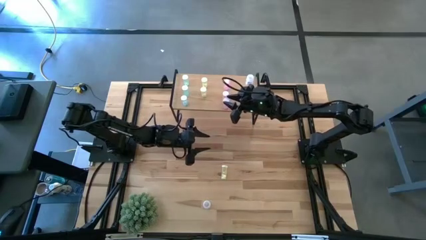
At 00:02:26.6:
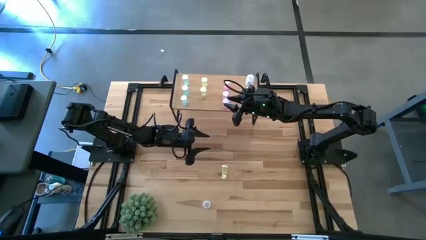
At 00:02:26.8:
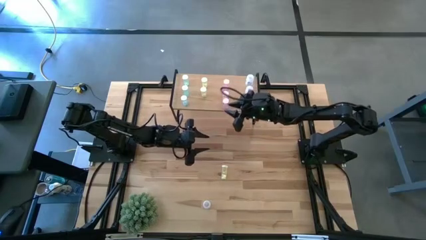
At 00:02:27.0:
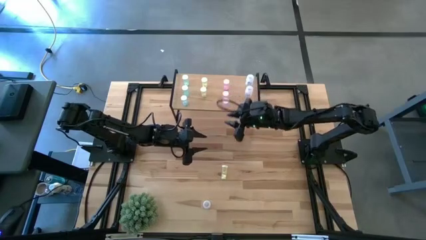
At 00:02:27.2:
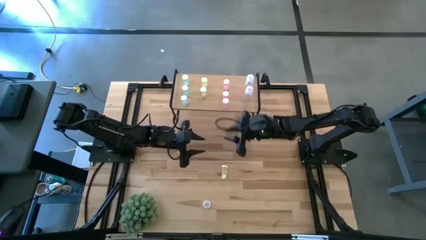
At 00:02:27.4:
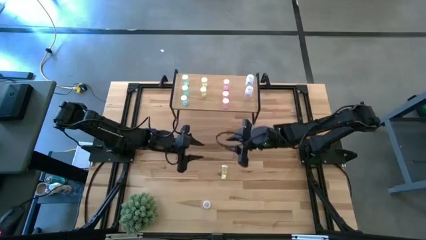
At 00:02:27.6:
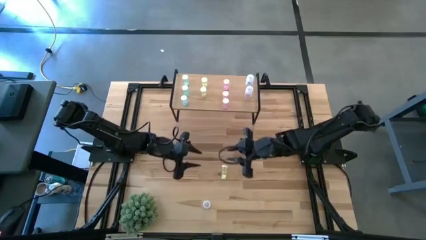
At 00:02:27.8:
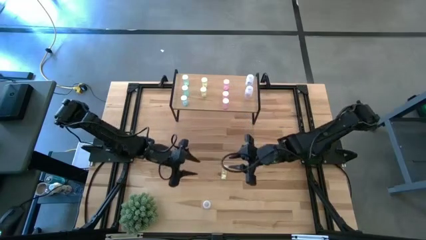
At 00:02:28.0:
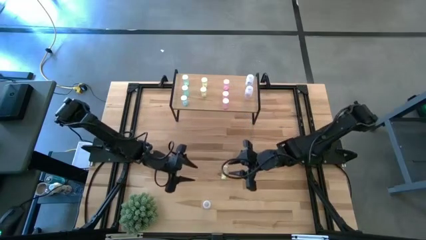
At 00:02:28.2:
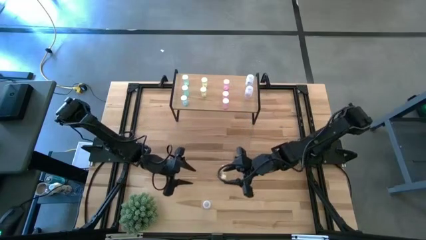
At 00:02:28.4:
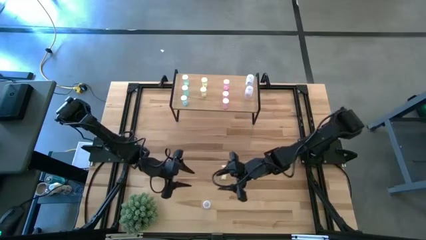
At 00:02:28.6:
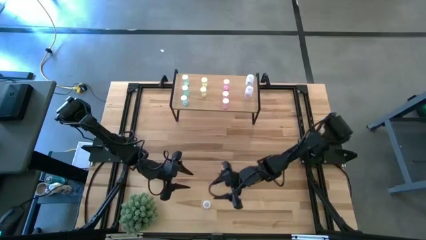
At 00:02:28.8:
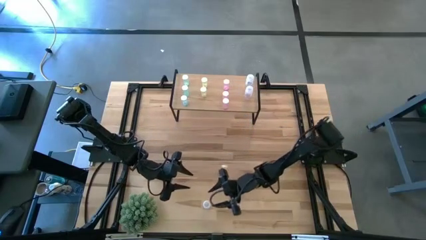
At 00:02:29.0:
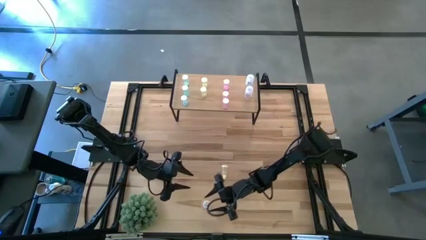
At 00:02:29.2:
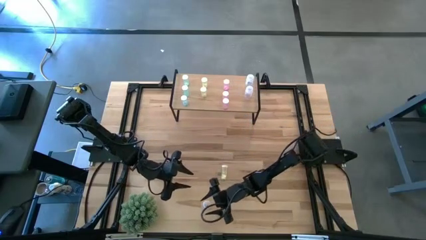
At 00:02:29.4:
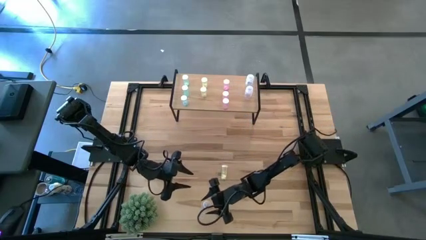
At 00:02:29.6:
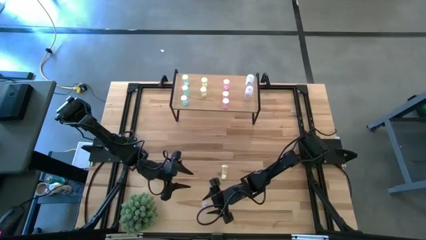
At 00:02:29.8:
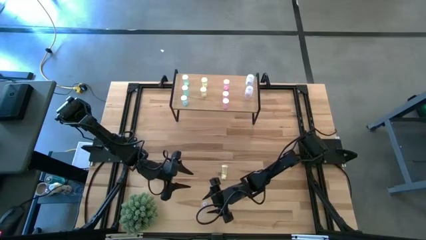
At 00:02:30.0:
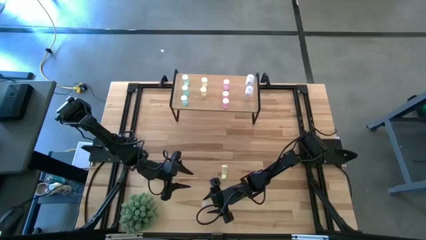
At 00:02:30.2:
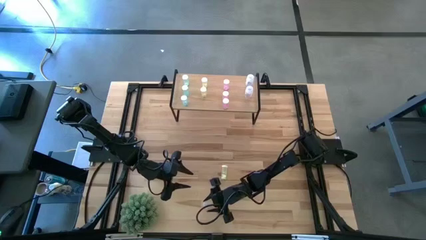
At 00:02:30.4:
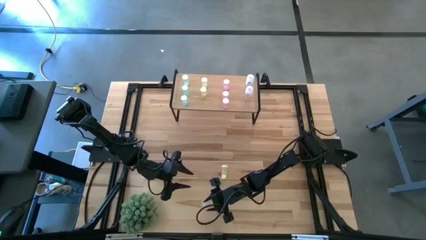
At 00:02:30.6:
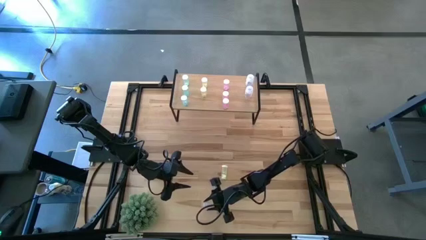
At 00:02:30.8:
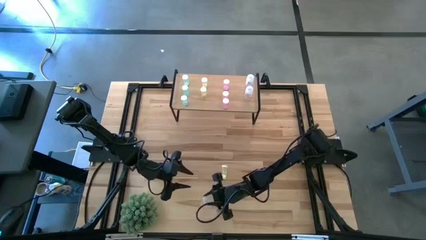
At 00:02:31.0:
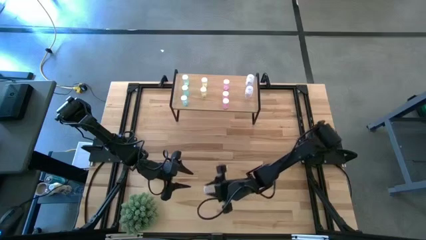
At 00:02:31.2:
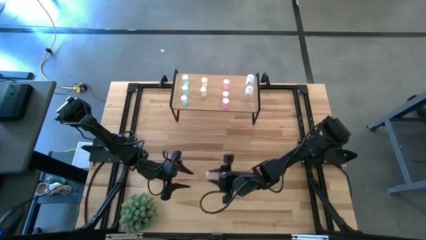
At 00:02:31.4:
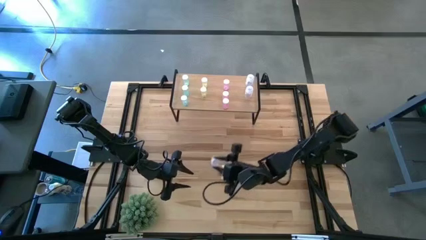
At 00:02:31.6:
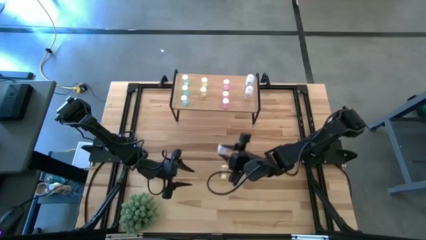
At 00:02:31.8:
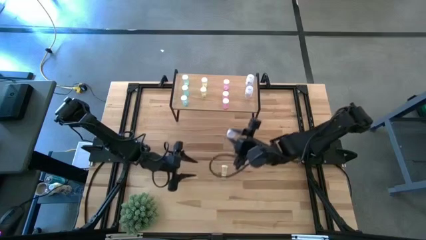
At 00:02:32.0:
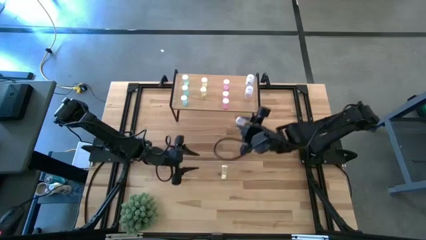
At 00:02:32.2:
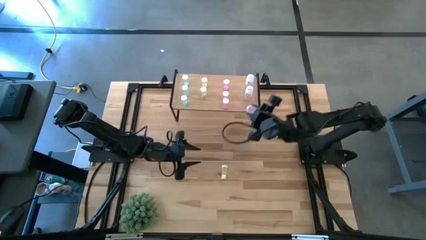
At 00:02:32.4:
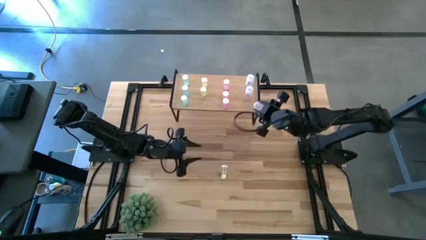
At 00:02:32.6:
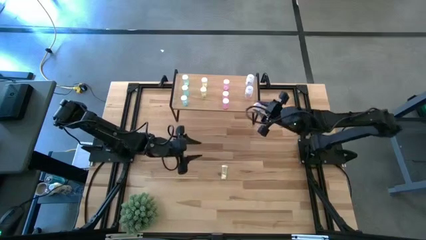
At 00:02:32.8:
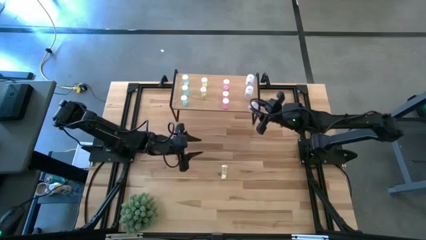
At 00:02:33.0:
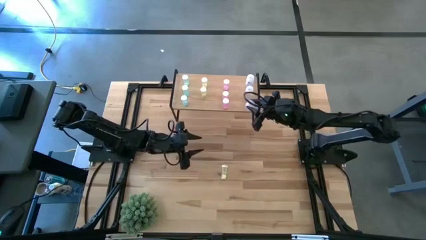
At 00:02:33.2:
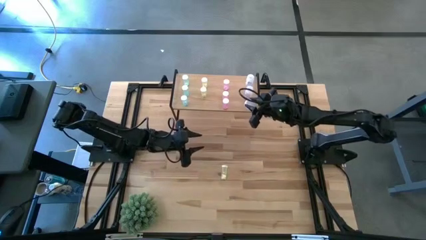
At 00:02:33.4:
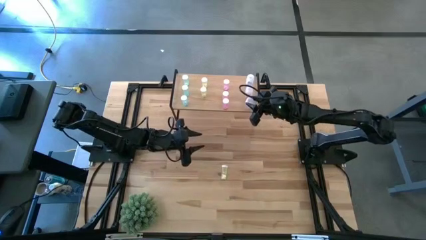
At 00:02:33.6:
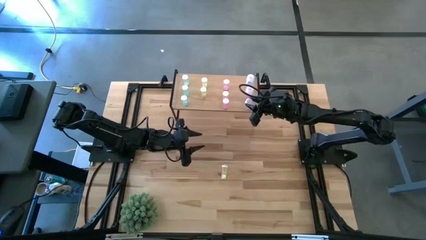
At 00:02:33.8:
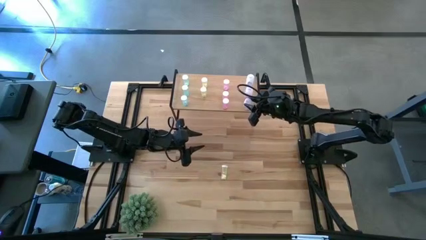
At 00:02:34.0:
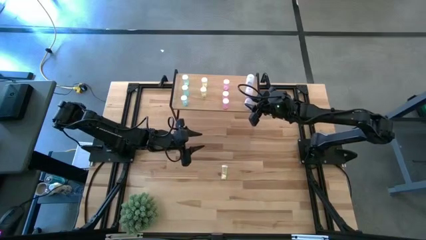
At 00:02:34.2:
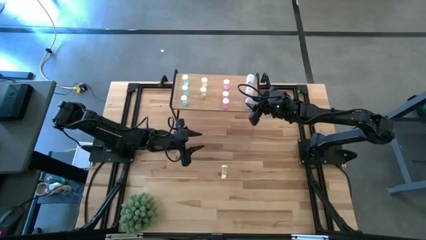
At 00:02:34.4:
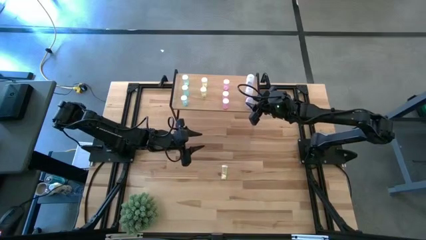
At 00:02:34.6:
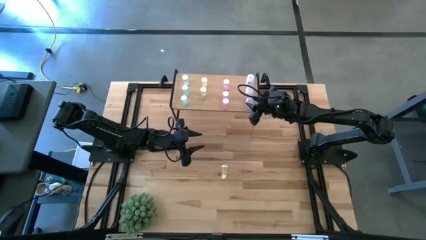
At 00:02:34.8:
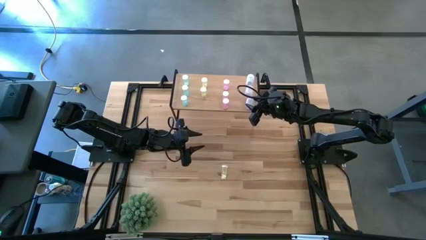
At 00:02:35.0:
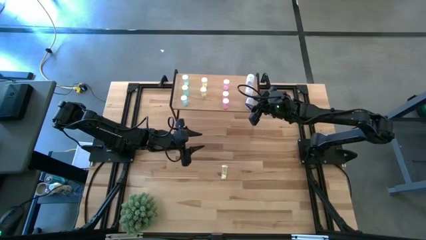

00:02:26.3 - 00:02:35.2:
Task: Pick and place medicine bottles onto shelf by color
Put the white pill bottle on the shelf aligned with the other white pill bottles

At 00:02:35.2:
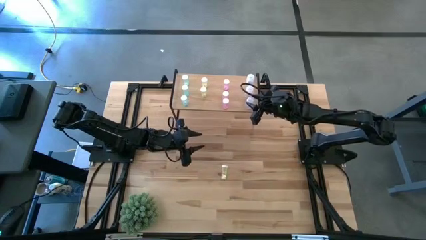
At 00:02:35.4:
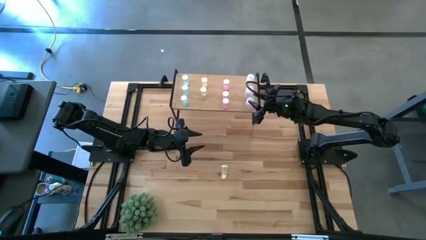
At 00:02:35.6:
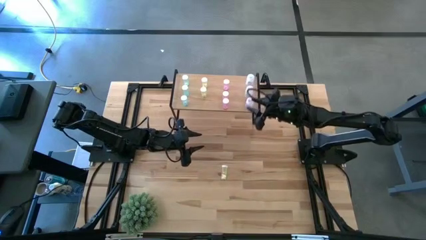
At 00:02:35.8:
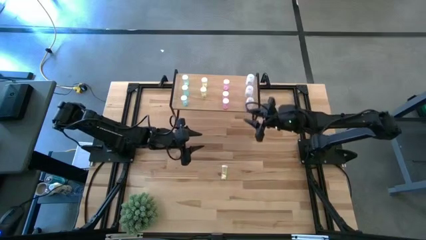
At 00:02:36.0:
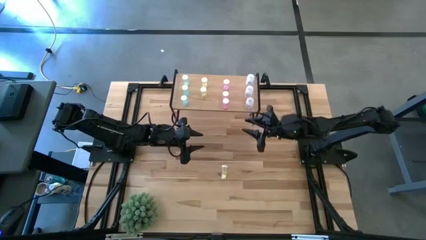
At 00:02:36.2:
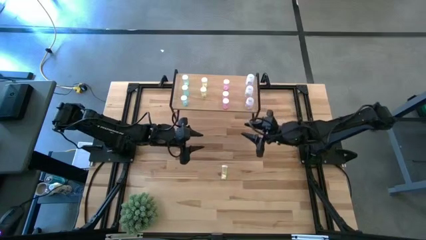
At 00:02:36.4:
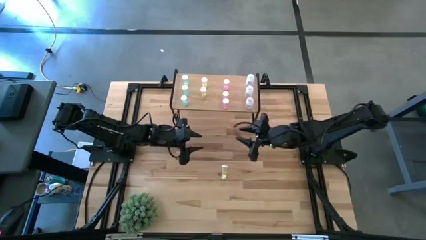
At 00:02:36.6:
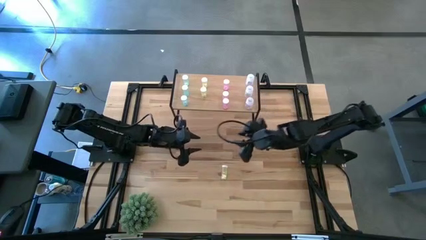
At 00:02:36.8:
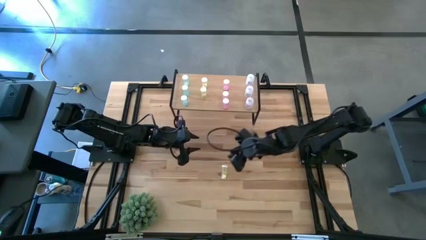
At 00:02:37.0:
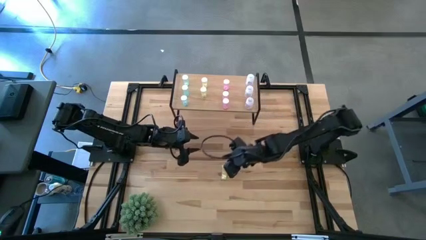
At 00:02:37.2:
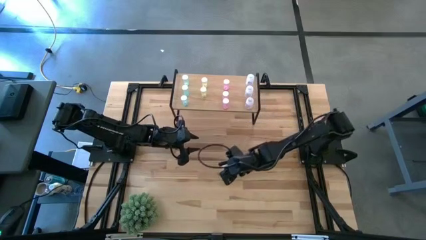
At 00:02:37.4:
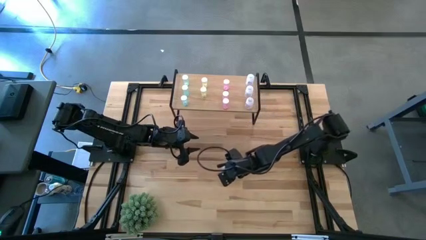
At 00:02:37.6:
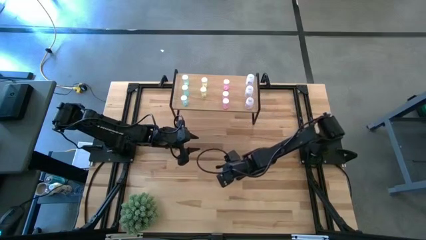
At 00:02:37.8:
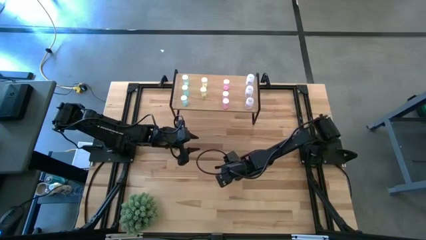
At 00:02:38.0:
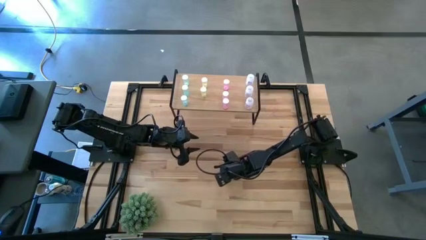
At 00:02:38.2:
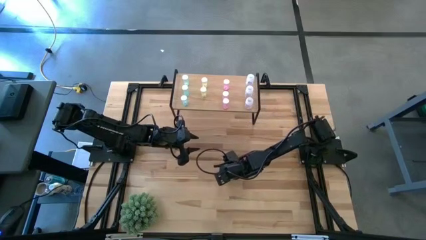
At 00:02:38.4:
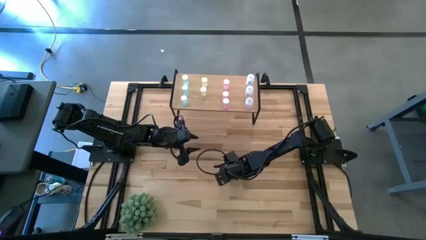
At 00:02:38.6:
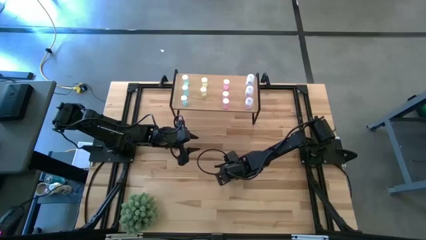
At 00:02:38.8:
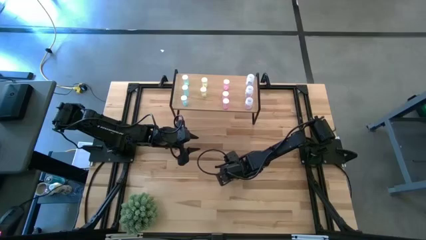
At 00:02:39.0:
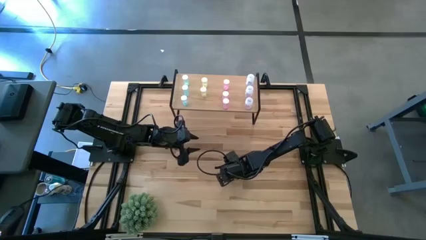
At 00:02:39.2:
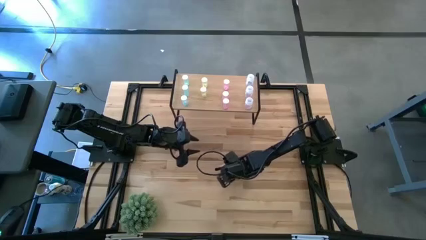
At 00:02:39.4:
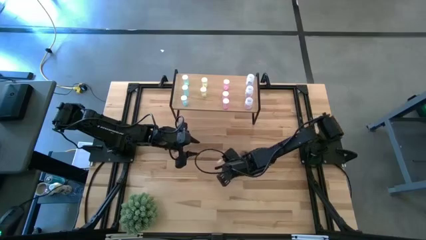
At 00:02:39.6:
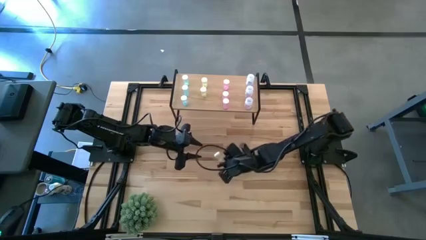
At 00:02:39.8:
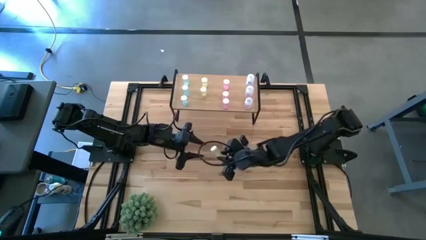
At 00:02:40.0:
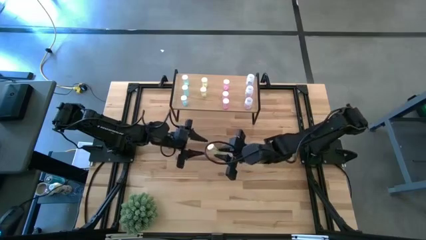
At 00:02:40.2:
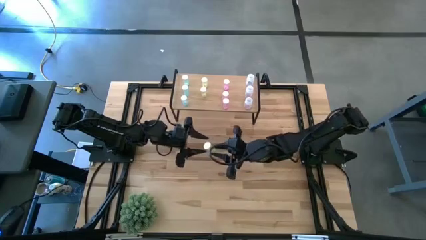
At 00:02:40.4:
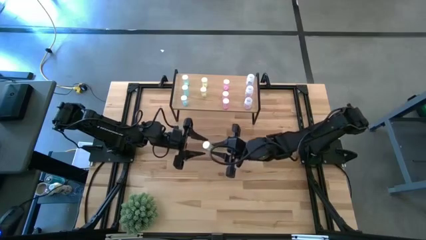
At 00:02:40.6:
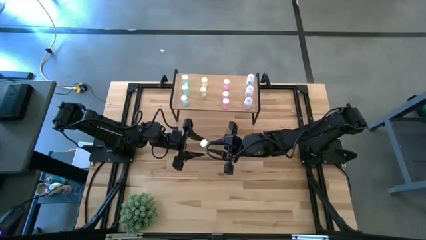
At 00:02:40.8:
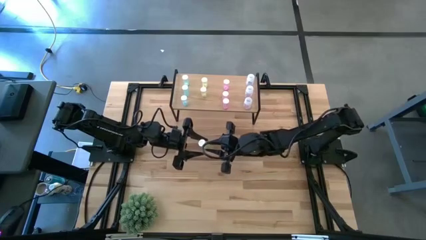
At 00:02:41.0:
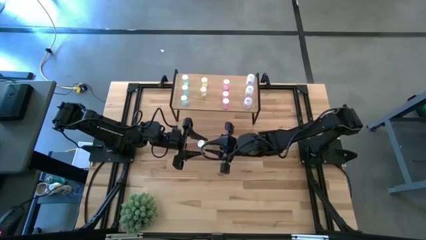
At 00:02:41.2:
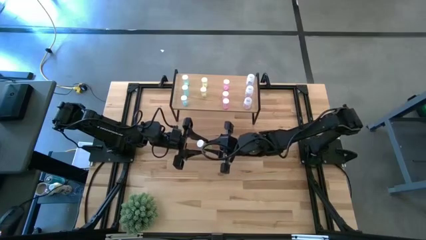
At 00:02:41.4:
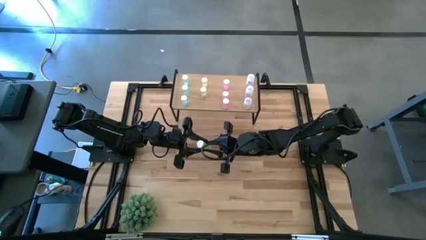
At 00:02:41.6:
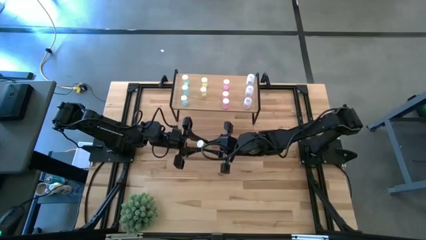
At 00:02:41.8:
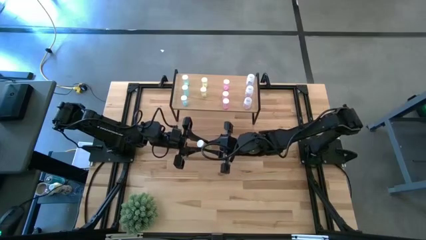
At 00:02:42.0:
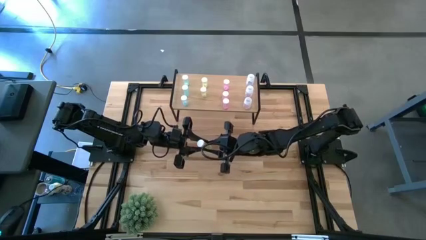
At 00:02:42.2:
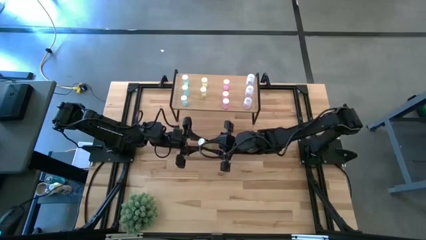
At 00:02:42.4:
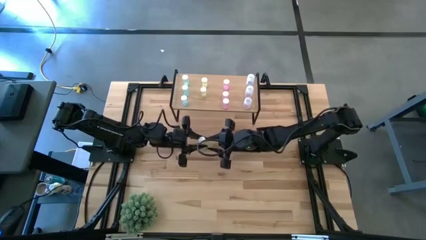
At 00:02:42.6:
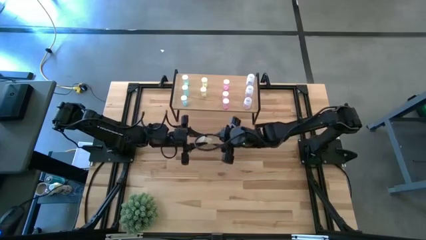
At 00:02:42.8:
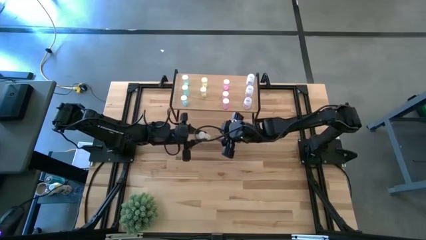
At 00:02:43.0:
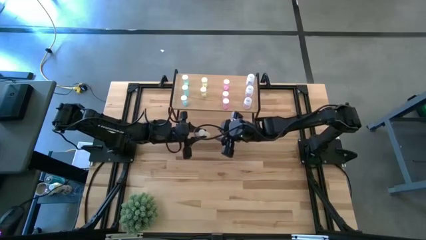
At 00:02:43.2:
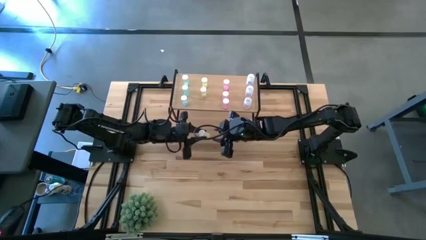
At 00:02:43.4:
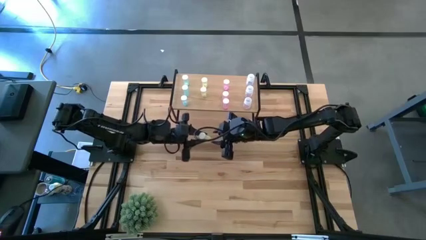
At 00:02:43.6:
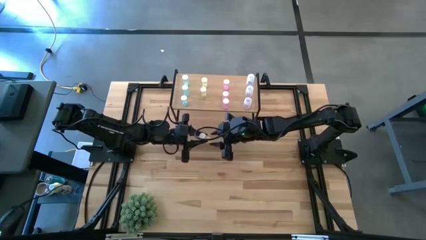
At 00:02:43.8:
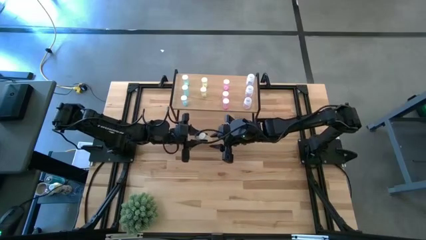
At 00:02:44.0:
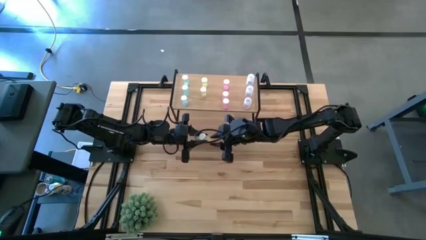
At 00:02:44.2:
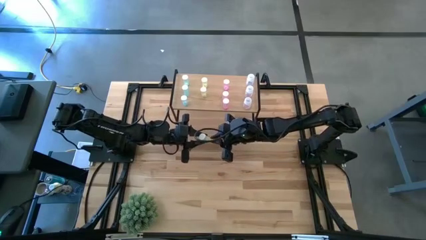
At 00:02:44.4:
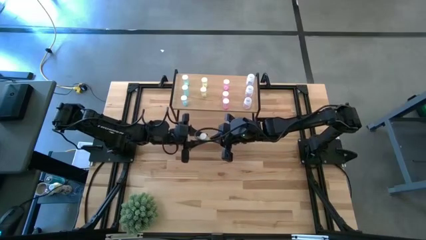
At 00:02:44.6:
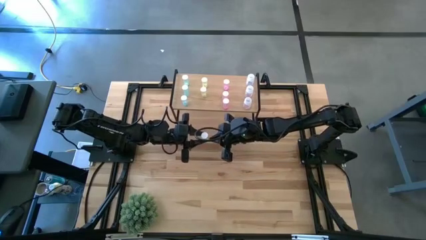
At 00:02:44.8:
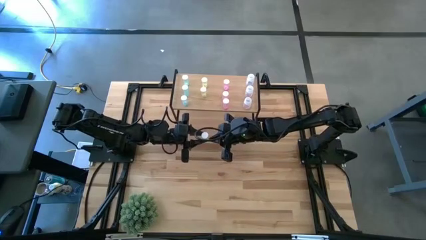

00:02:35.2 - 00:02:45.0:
Put the yellow pill bottle into the shelf aligned with the other yellow pill bottles
